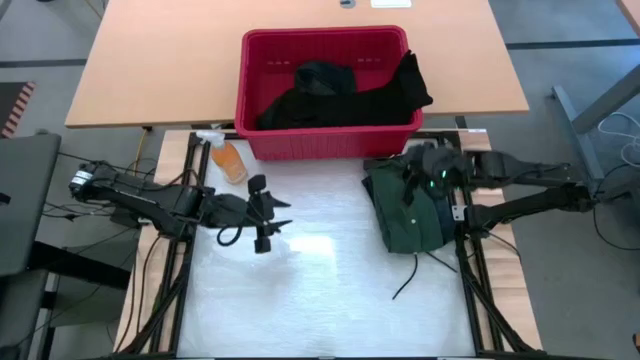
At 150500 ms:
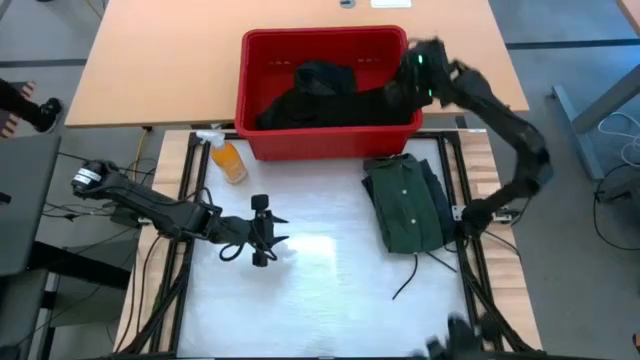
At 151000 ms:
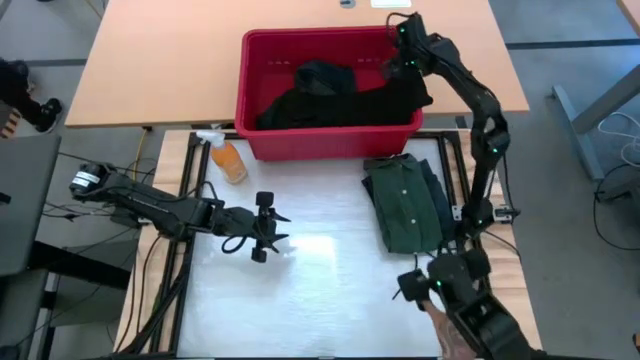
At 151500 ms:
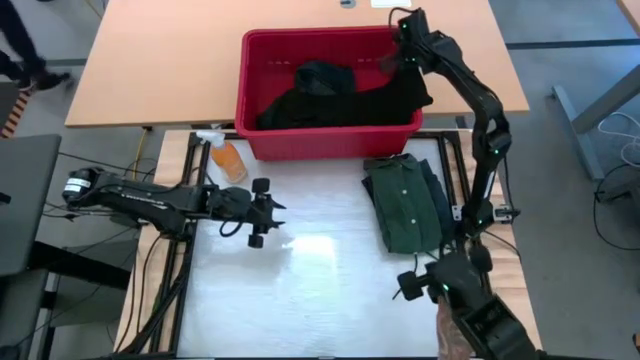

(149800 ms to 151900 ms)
Task: Fold laundry
Fold the black shirt

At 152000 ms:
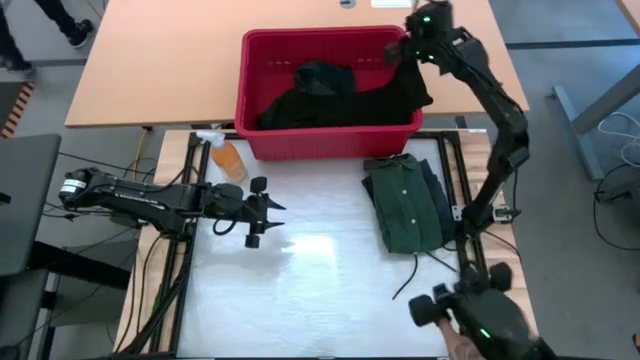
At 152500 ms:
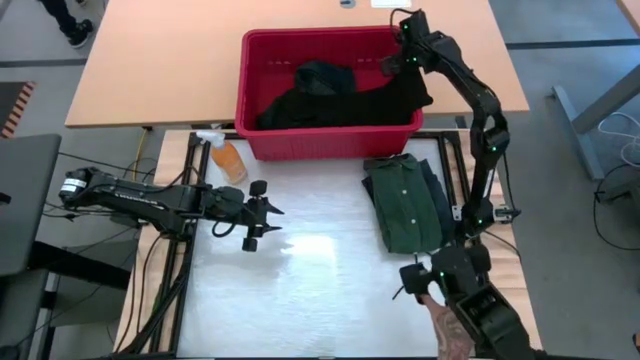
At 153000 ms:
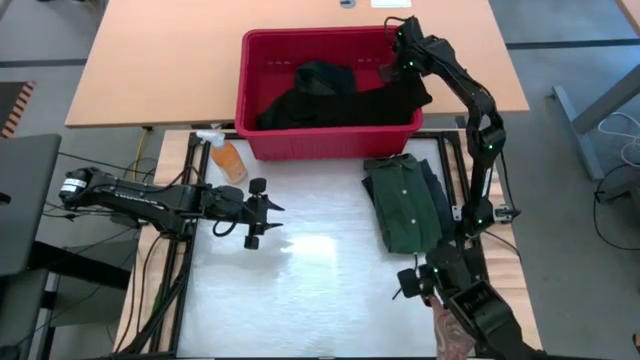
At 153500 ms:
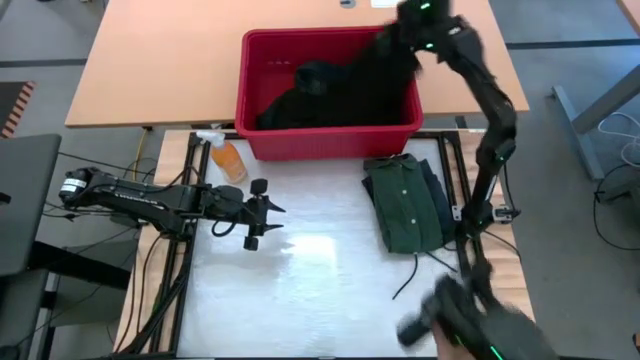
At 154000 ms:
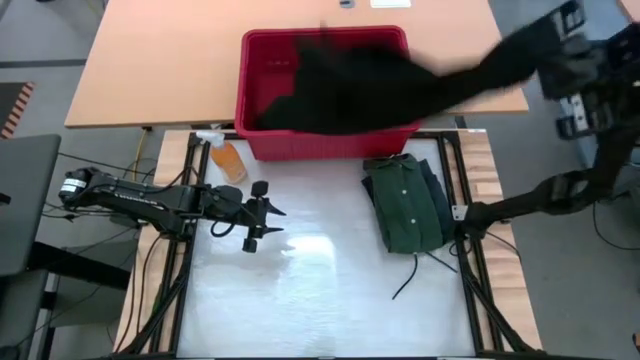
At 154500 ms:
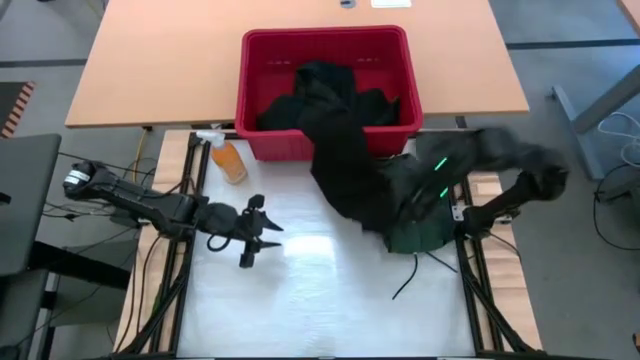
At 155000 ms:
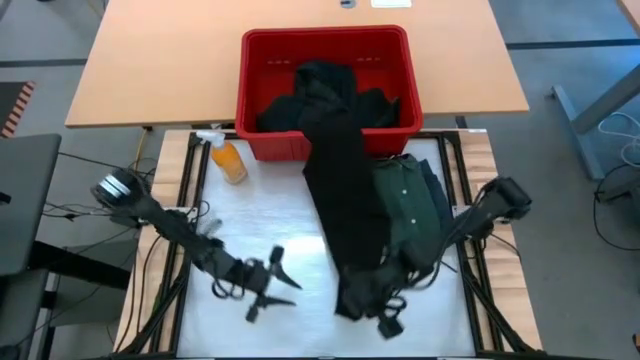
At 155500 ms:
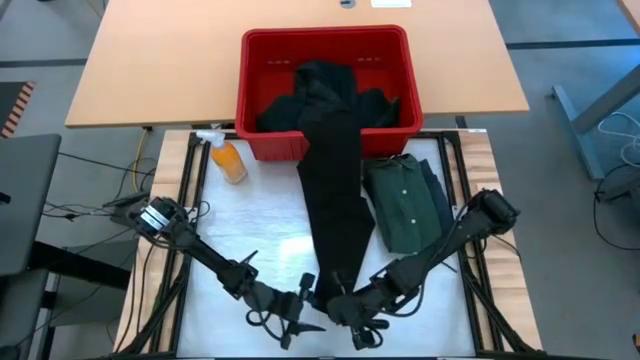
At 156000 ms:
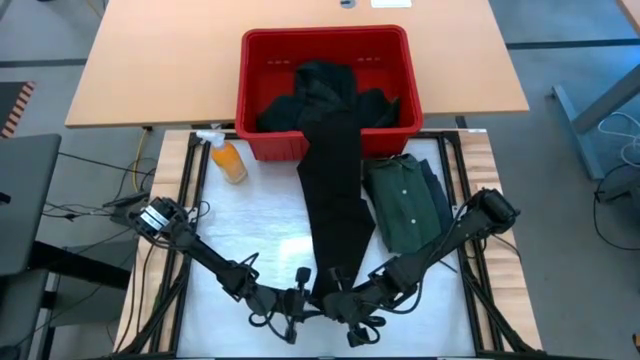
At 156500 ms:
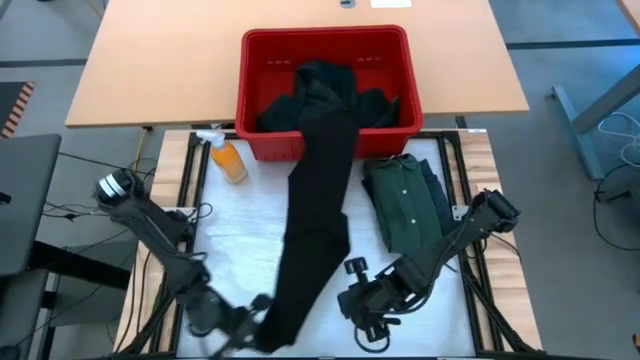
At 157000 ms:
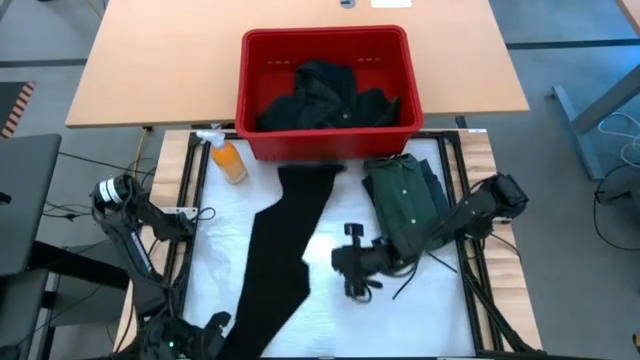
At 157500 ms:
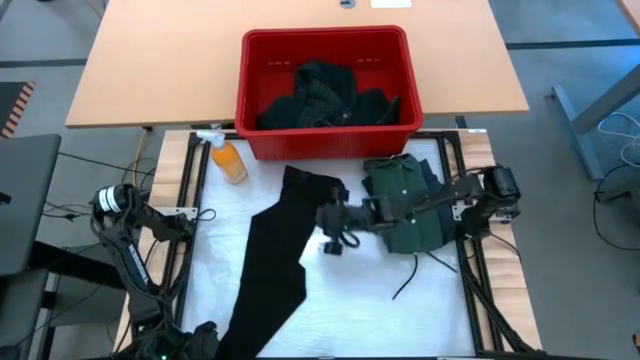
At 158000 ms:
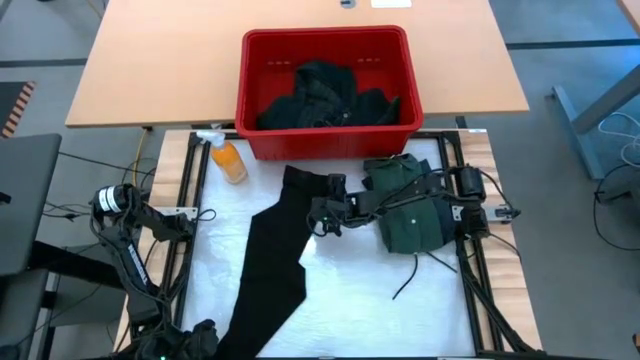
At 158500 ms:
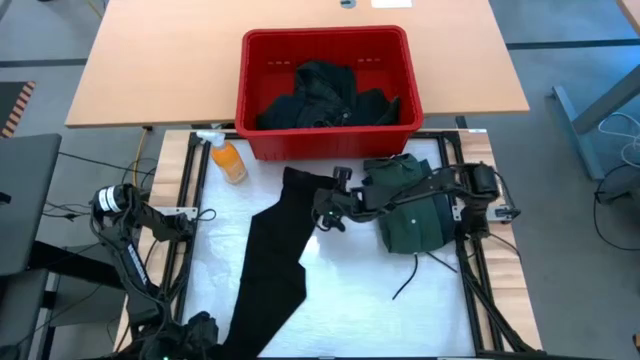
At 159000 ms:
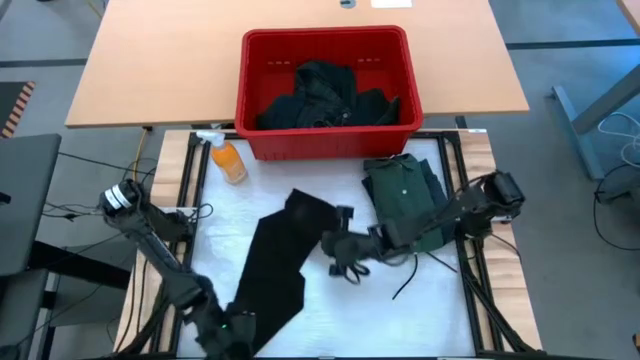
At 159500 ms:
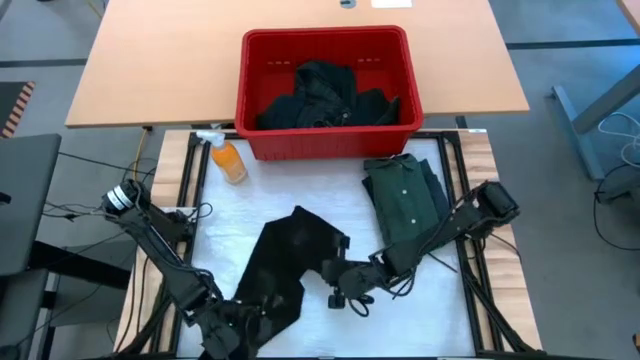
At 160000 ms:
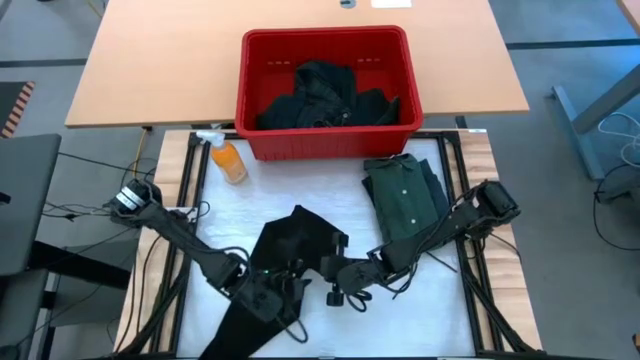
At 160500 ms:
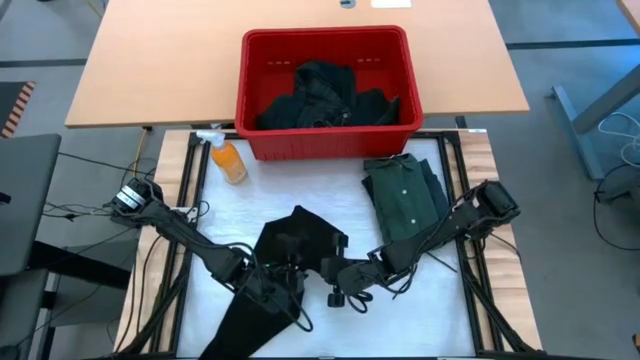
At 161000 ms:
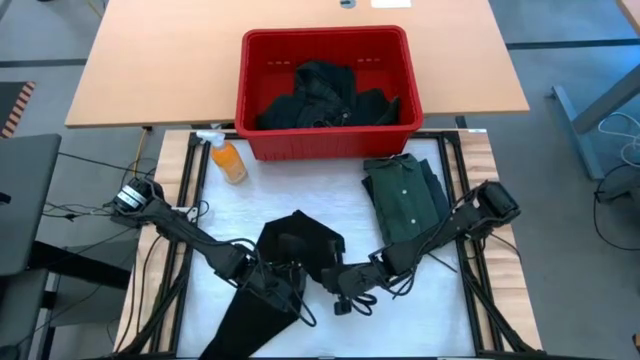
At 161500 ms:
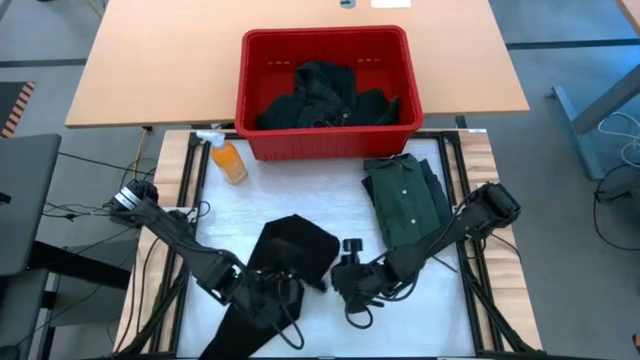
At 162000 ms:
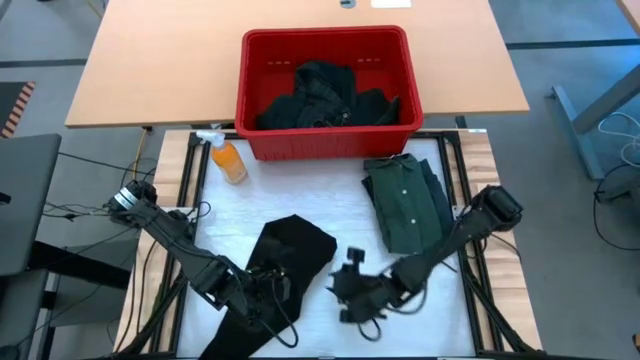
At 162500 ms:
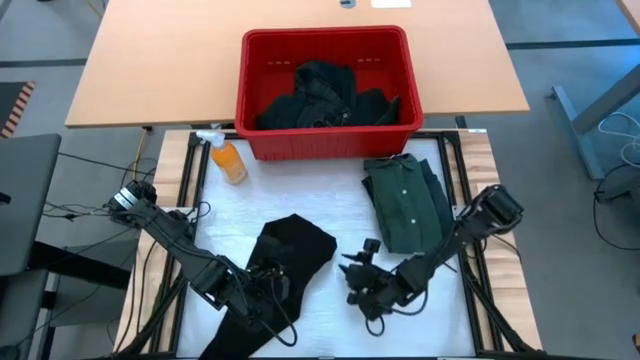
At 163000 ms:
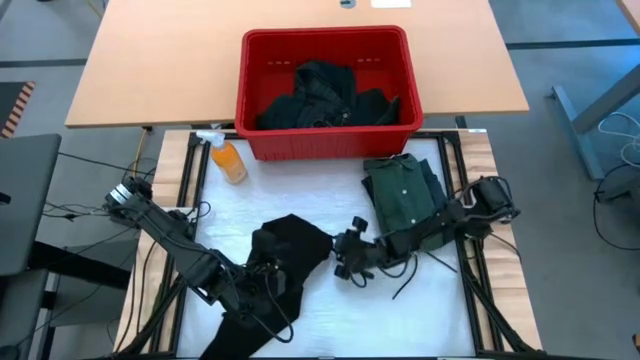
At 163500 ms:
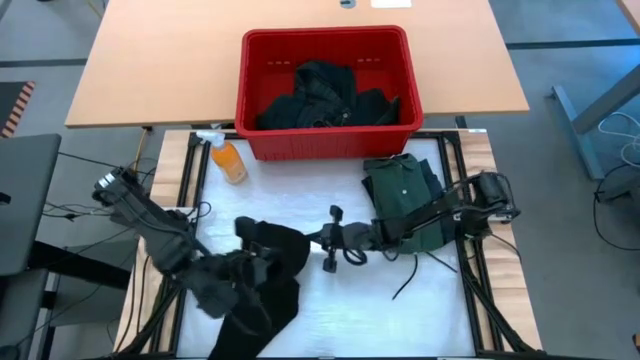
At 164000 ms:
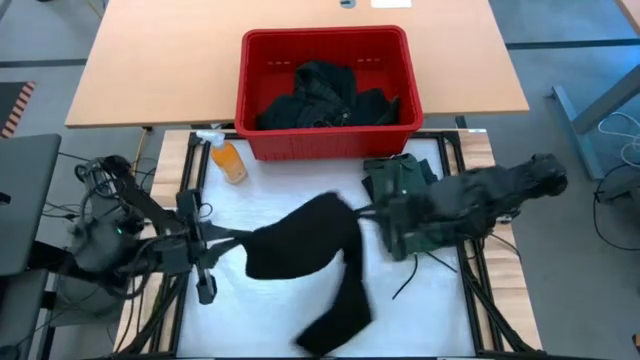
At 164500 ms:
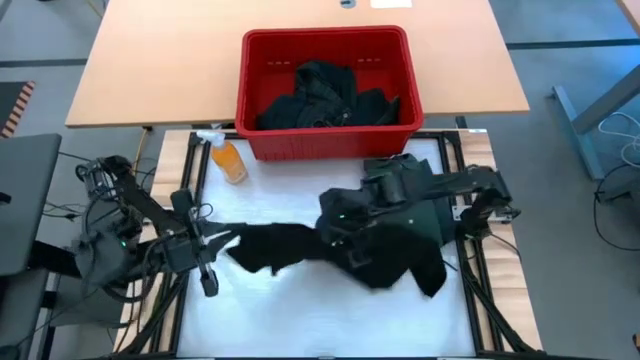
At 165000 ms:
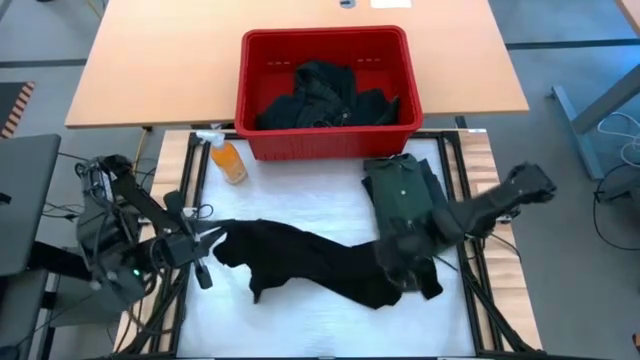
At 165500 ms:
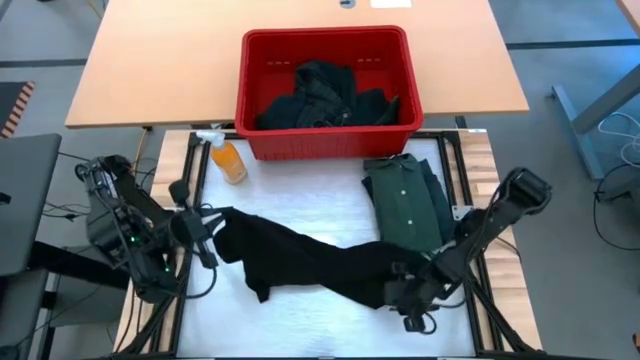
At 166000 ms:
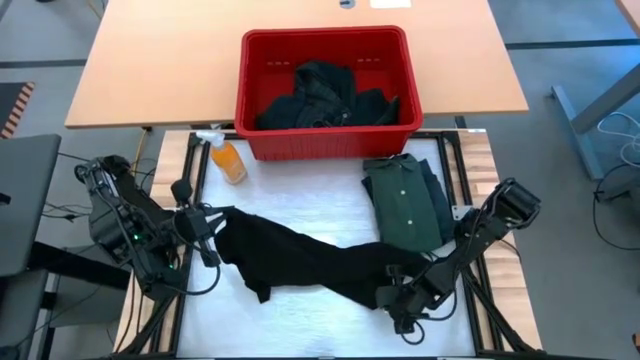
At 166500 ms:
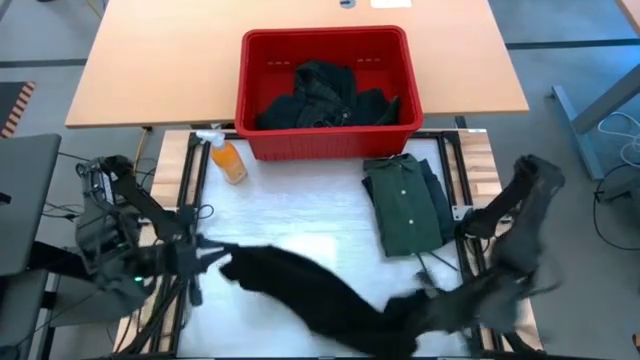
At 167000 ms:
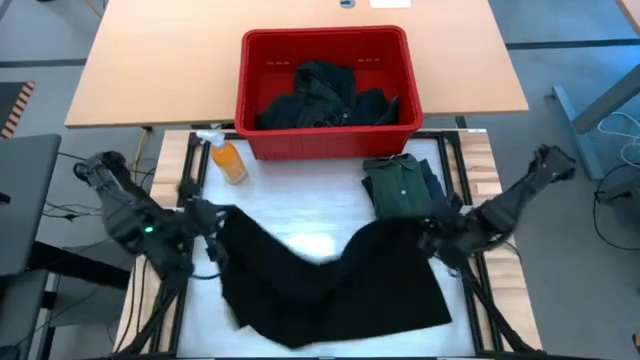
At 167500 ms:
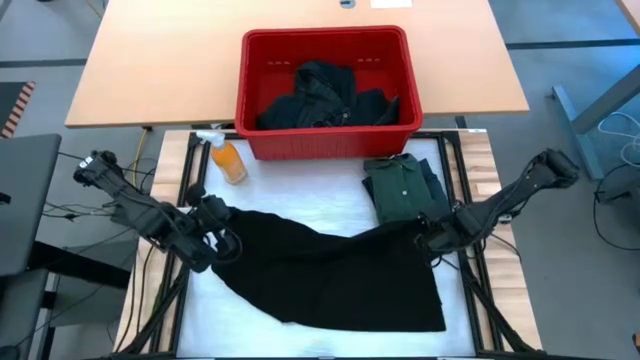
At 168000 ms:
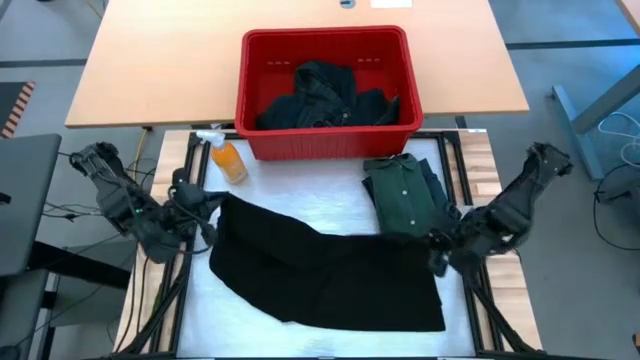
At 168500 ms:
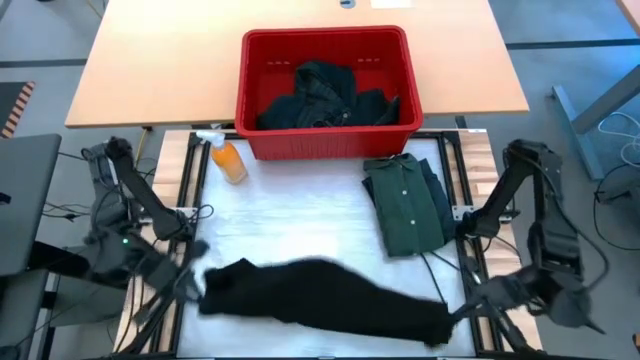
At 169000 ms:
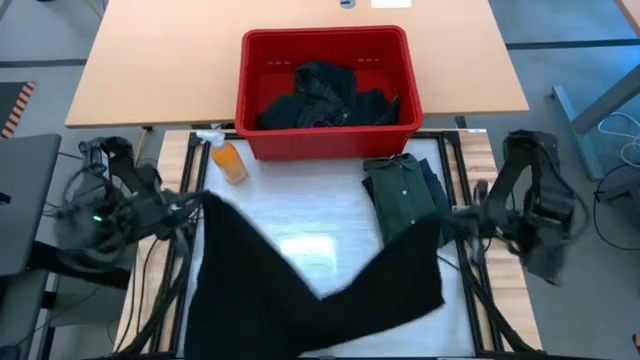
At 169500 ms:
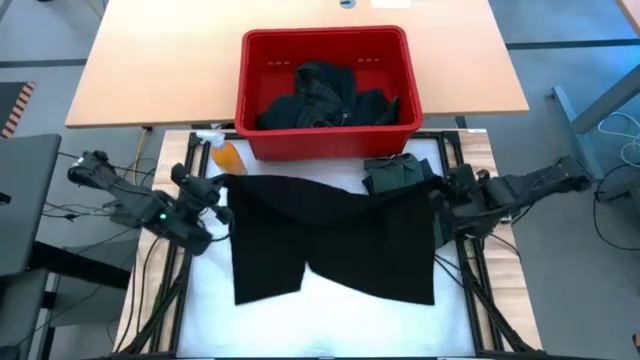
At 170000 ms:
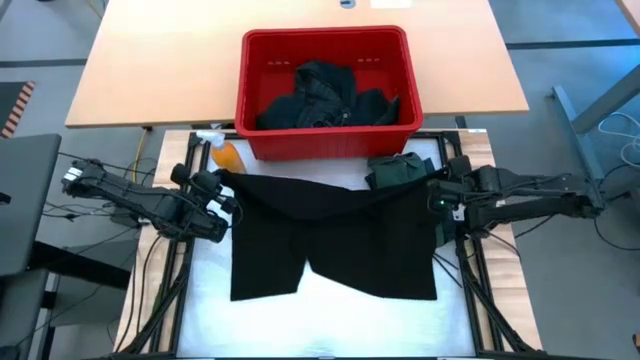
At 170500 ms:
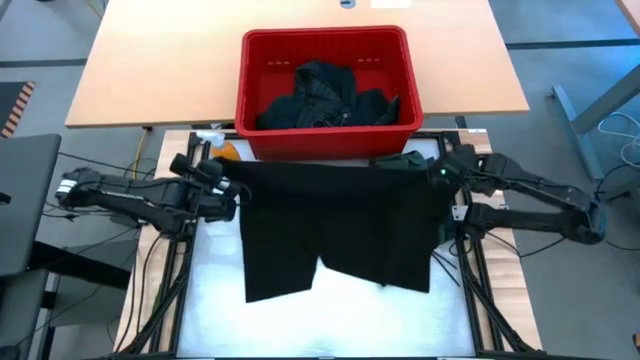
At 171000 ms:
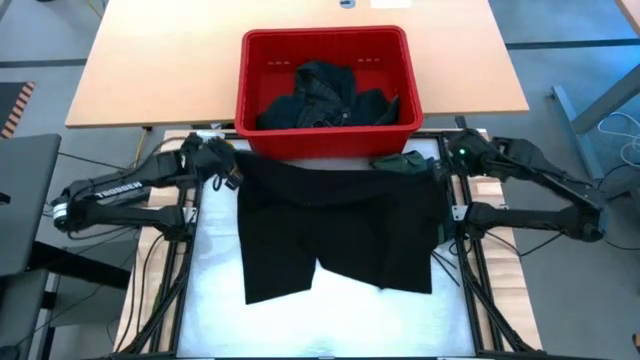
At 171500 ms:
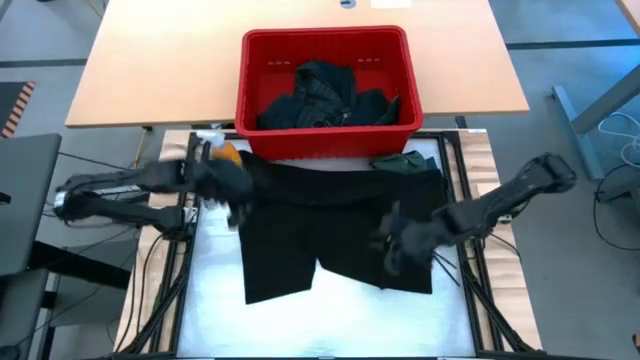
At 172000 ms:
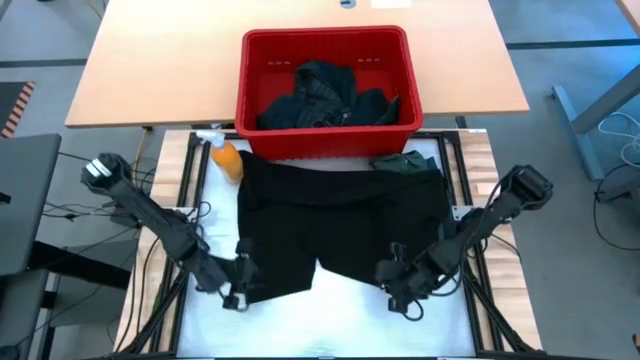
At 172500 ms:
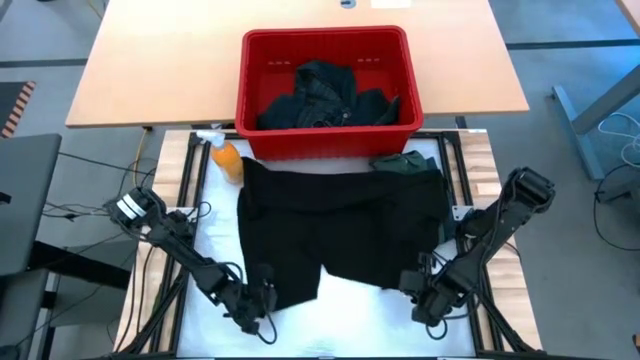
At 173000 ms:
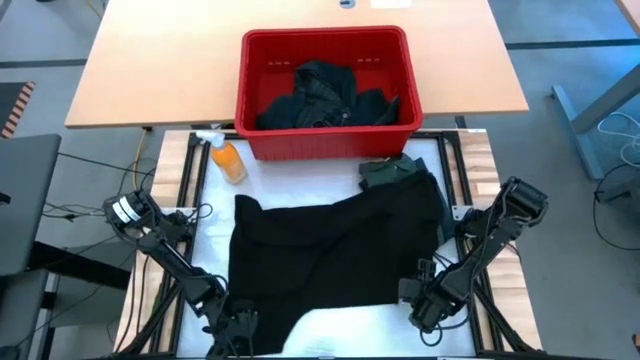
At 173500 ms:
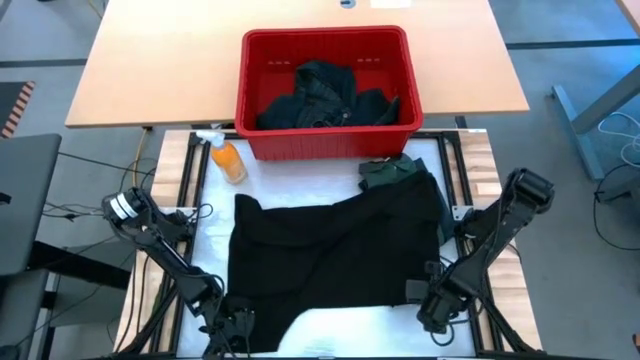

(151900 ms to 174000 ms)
Fold the black shirt
